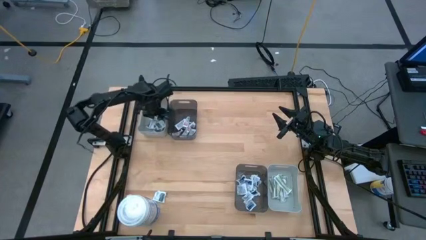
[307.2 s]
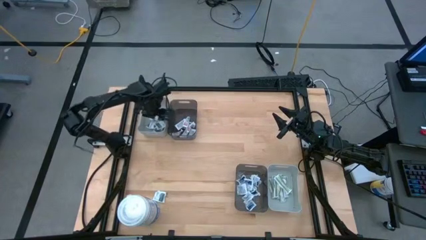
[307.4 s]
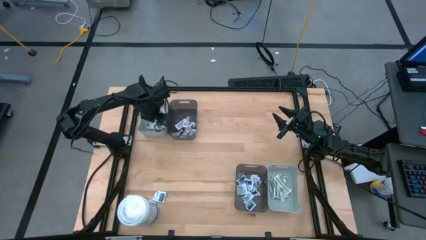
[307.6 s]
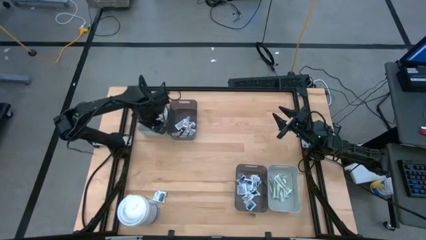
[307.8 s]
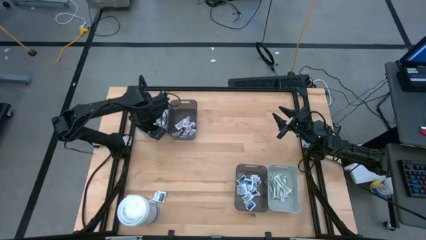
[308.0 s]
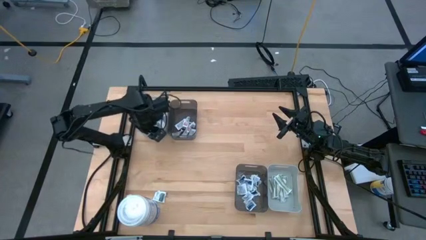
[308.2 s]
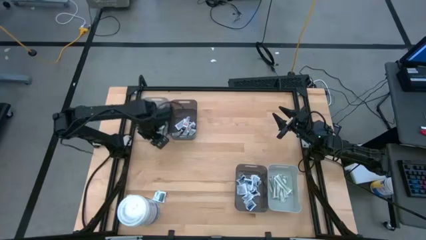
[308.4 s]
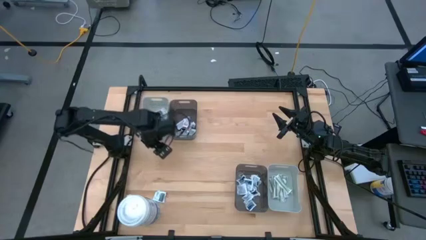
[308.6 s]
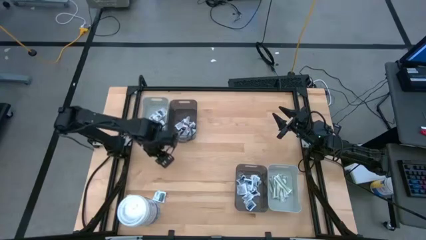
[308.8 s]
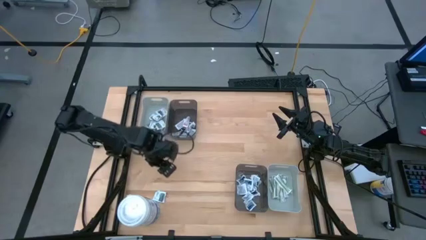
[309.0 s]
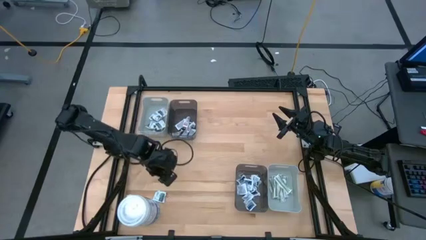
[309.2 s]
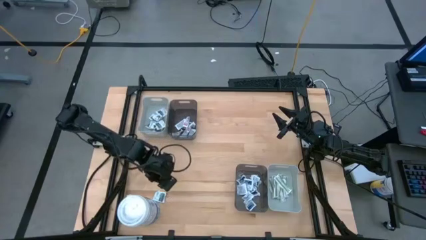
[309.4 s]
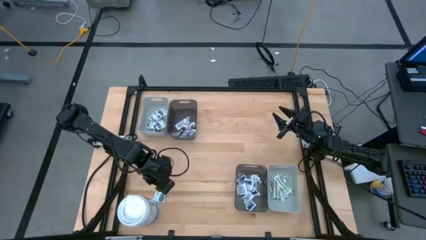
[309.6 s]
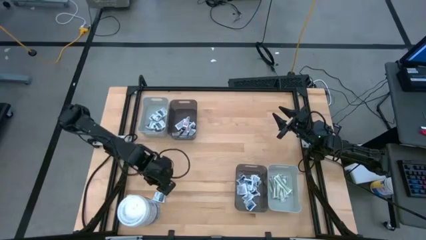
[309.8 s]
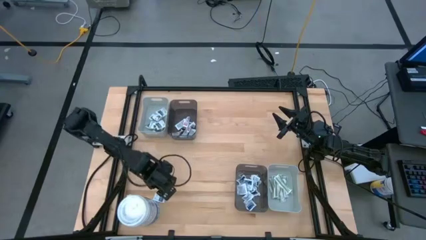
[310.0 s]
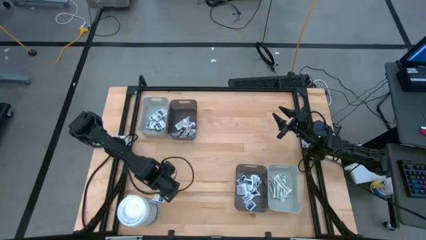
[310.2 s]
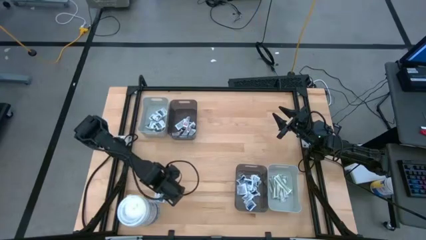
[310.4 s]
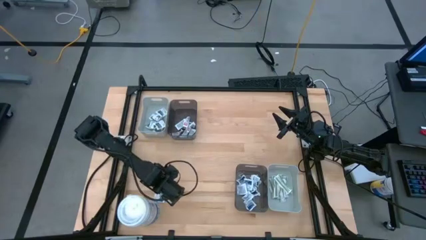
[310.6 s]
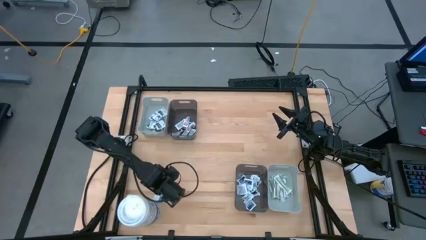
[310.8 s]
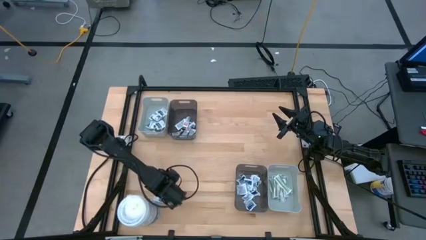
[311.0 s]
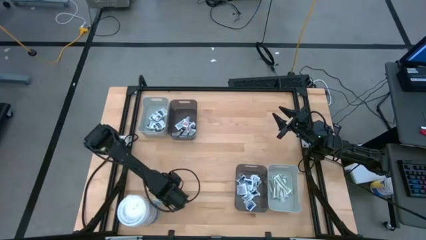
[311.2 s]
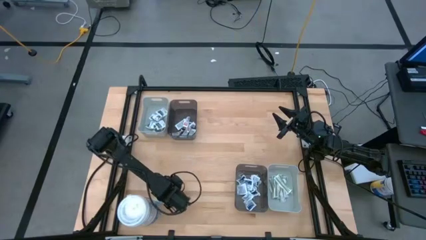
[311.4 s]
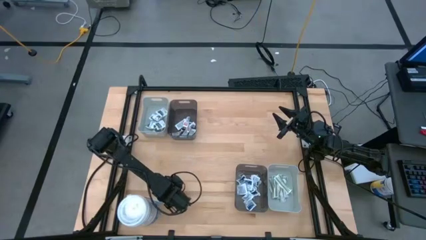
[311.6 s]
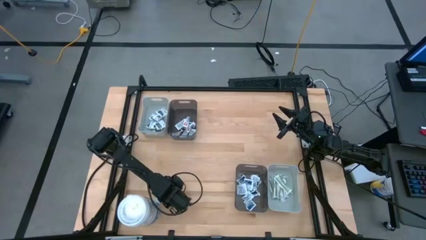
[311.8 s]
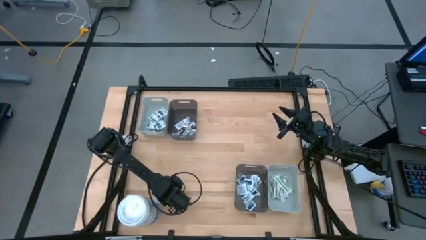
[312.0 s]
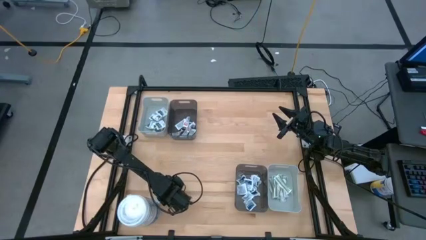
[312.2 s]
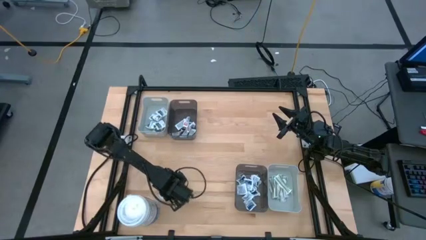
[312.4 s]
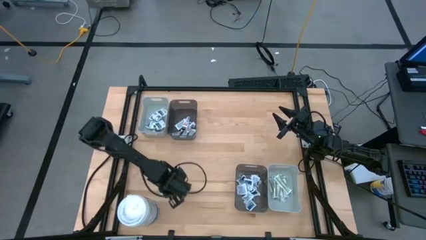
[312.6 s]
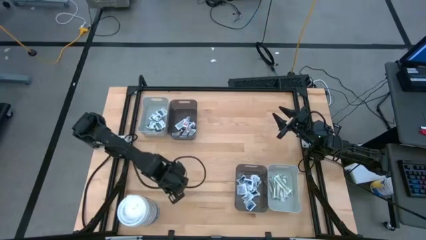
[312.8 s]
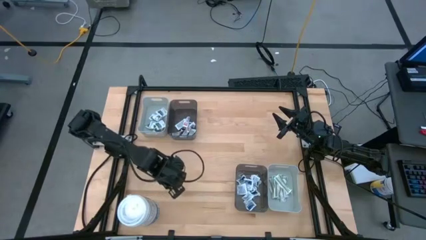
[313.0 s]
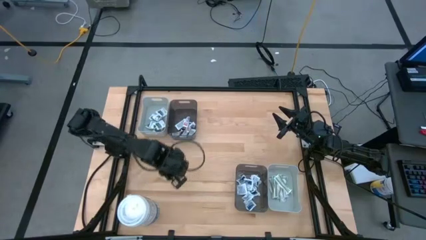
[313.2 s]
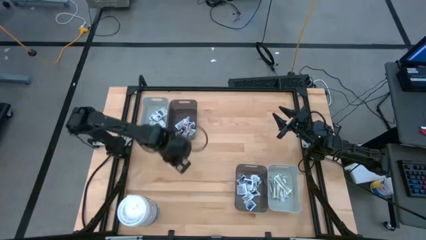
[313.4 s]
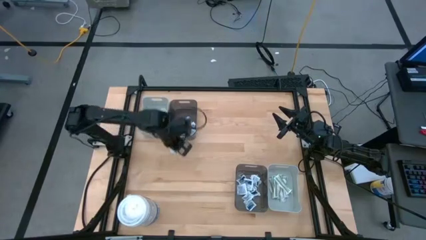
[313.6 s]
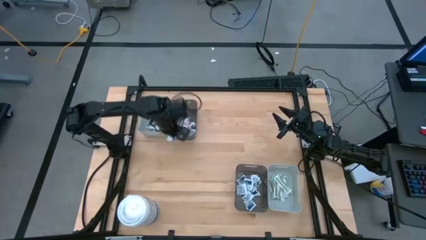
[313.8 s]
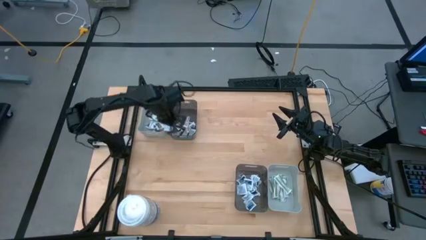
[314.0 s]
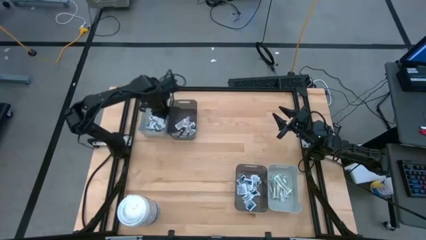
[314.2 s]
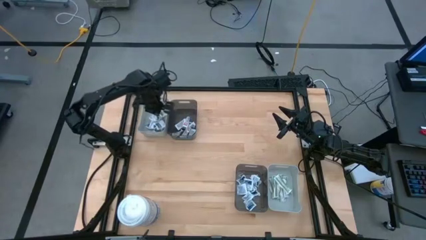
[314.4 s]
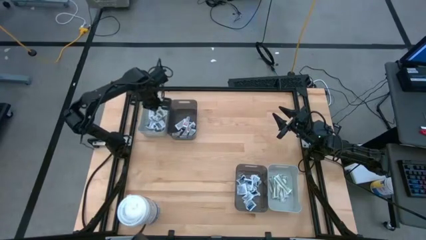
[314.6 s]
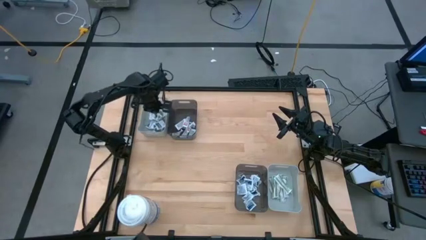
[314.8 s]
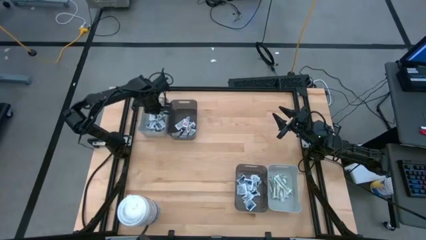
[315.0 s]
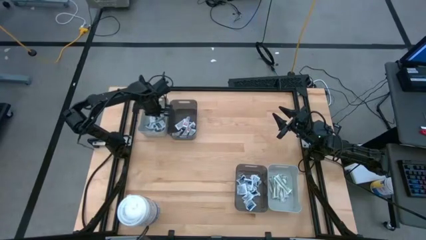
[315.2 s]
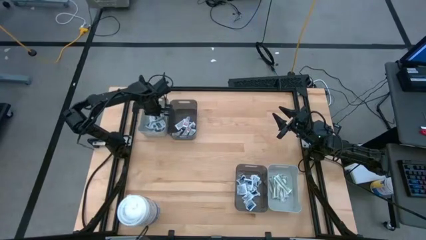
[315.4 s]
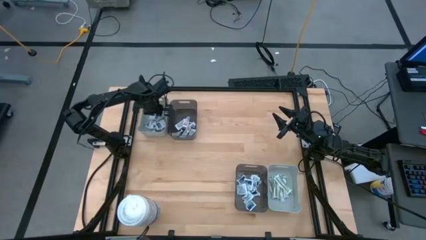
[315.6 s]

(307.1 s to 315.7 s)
Task: Pick & Place First Aid Supplies
Put the white towelette pack into the top gray bin

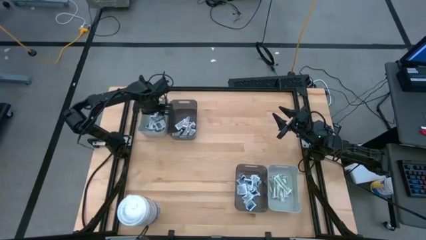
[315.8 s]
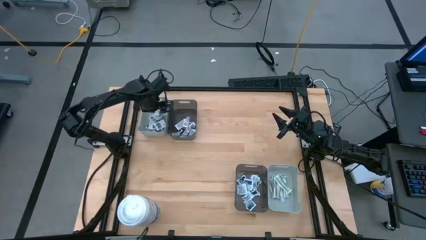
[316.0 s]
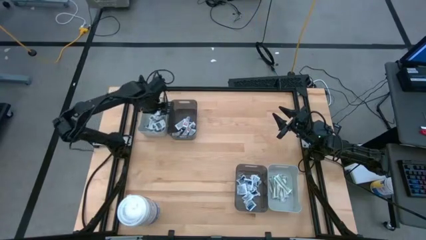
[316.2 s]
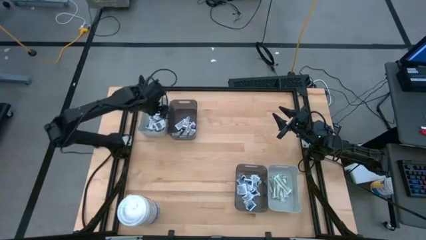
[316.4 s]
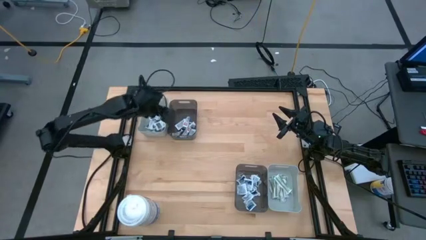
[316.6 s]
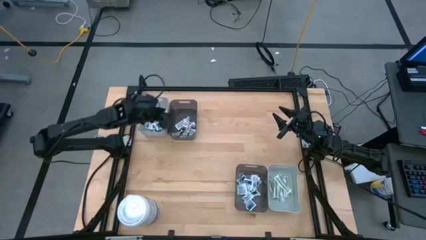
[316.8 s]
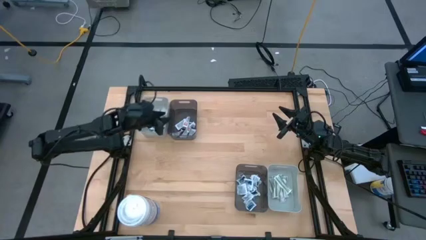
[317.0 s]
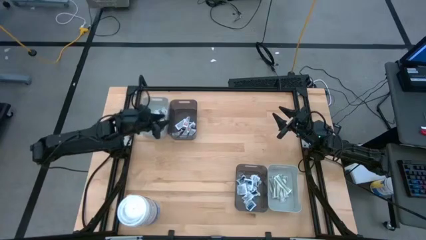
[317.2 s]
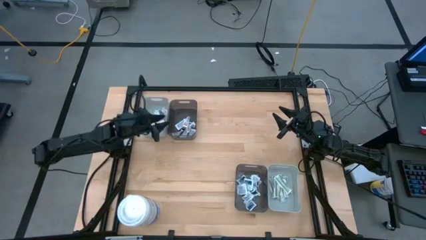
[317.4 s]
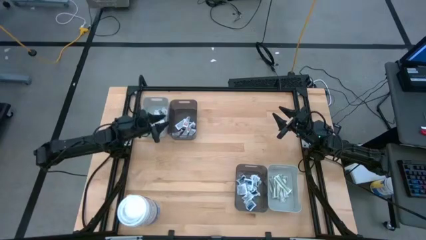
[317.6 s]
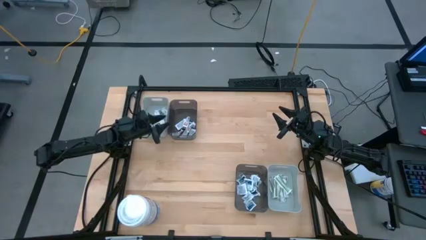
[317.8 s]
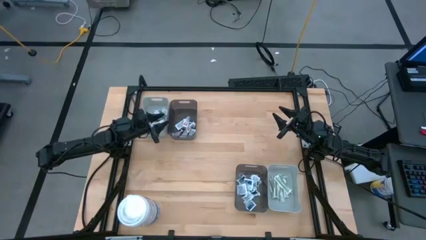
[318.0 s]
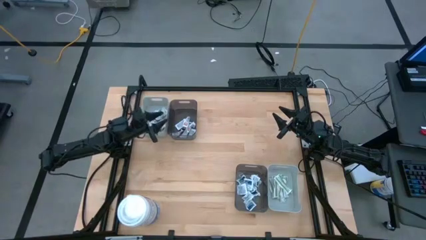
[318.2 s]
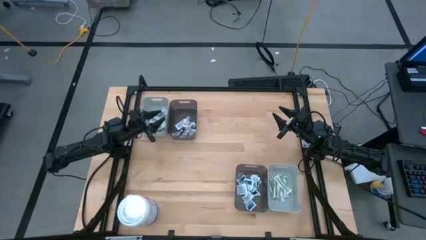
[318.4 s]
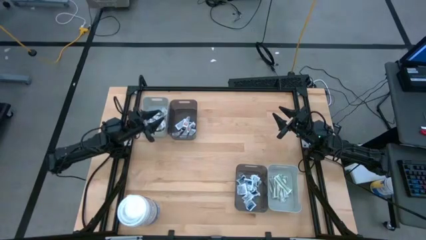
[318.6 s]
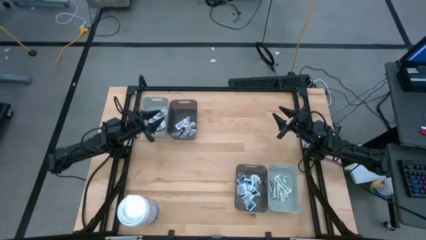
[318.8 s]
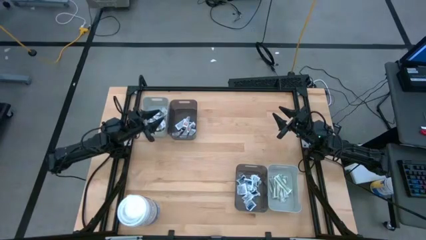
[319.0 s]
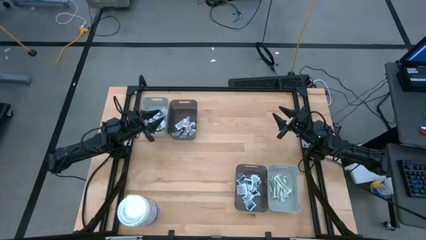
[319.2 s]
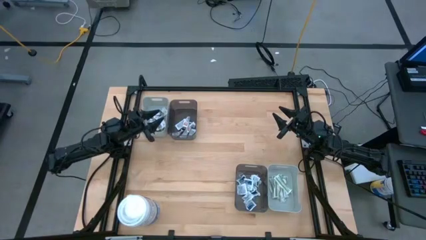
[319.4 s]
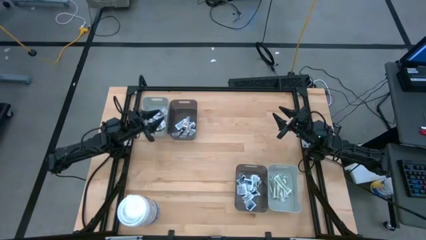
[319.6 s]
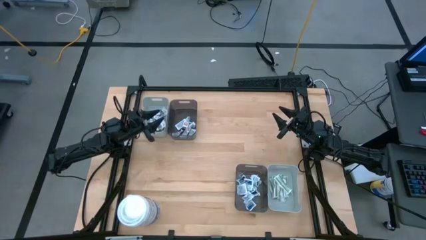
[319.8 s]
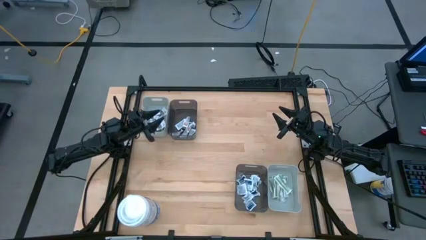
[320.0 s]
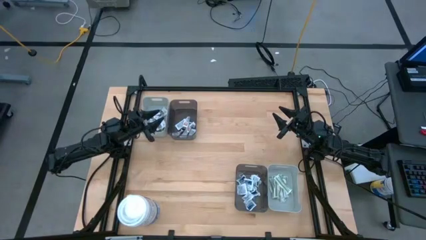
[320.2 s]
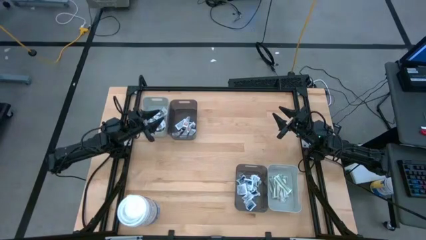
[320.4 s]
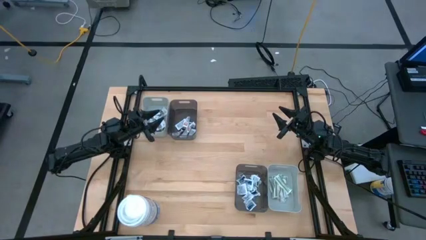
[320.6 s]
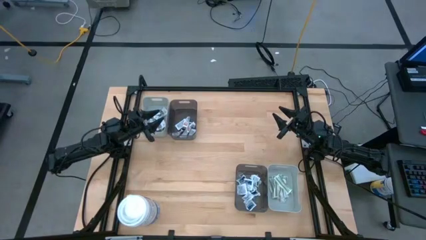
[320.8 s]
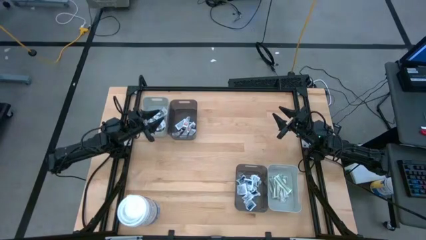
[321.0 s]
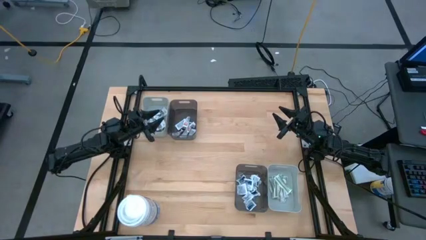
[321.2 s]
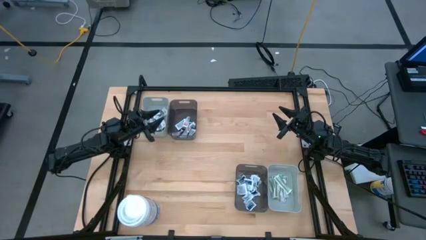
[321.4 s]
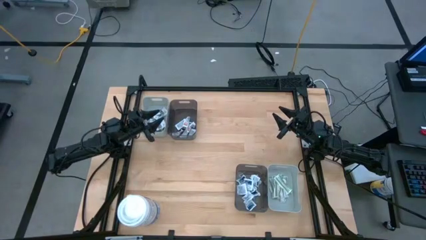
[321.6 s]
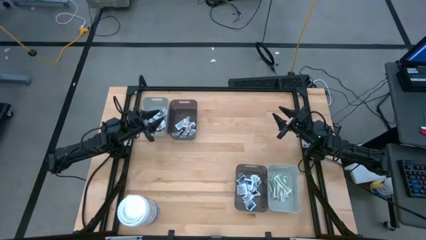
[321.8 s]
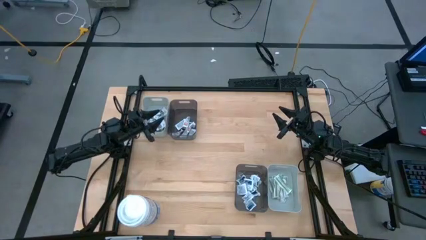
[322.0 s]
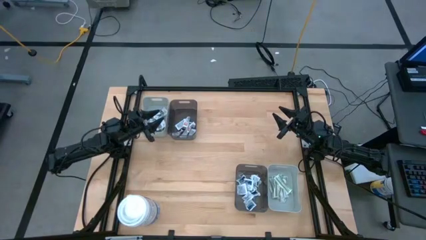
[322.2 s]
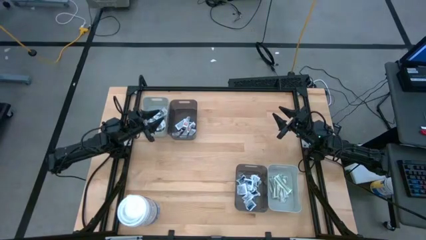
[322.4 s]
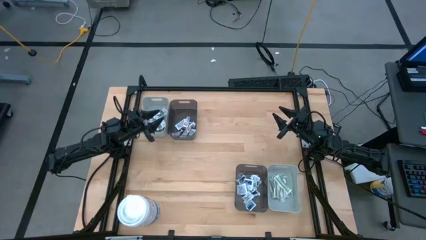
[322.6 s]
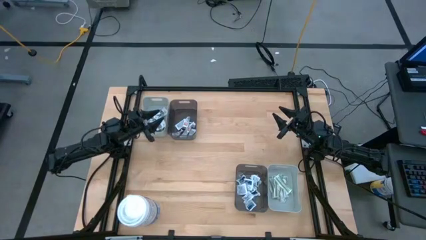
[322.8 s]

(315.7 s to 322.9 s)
Return to Home Position
